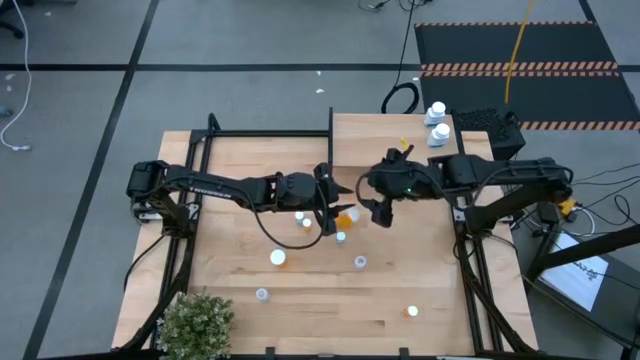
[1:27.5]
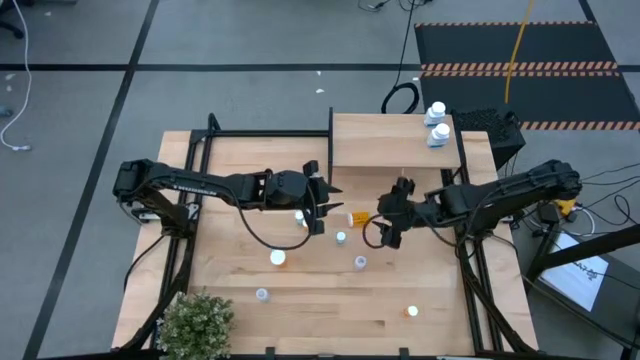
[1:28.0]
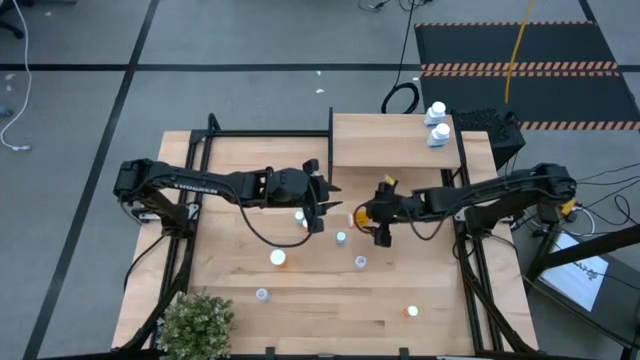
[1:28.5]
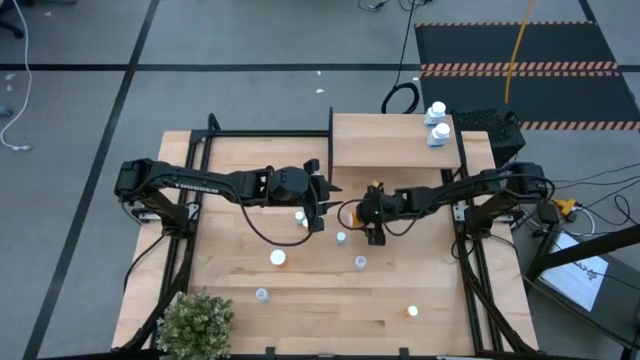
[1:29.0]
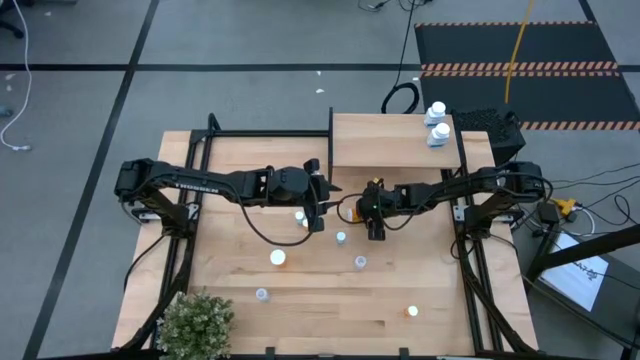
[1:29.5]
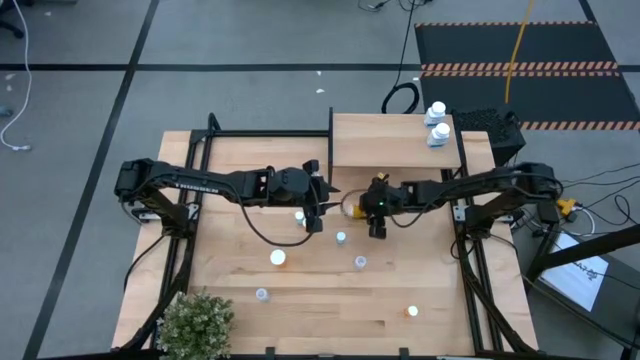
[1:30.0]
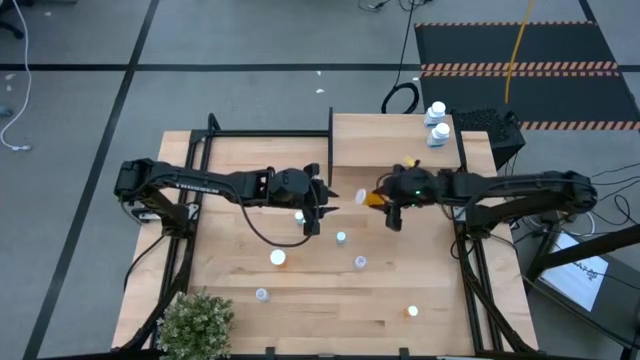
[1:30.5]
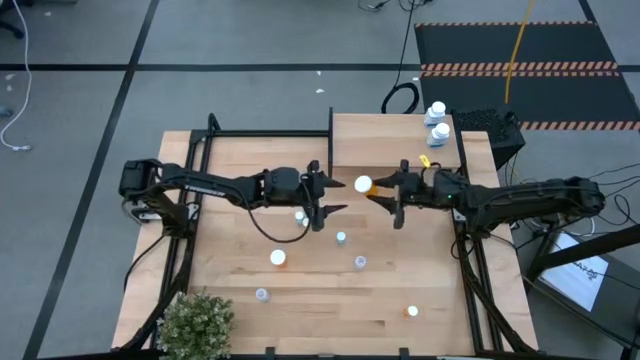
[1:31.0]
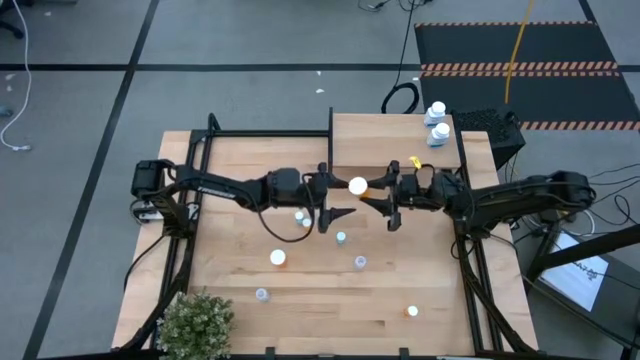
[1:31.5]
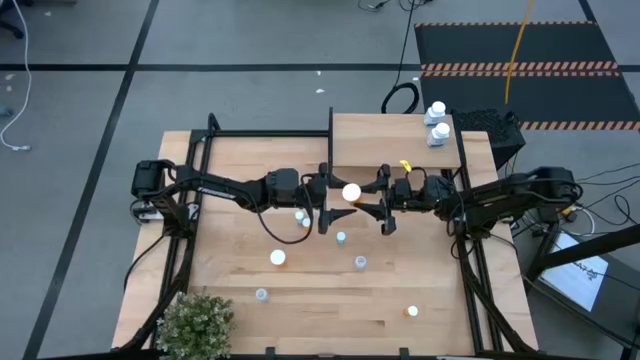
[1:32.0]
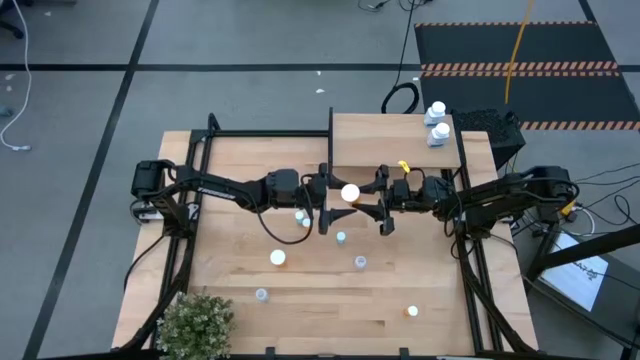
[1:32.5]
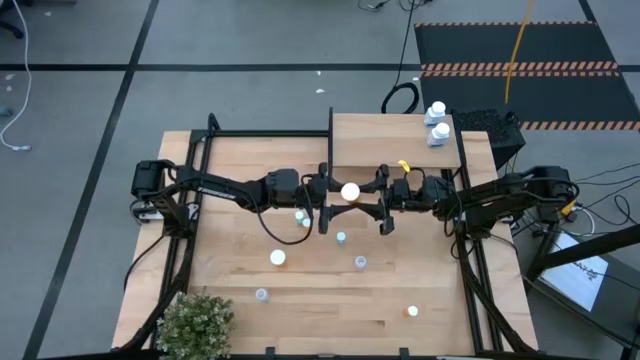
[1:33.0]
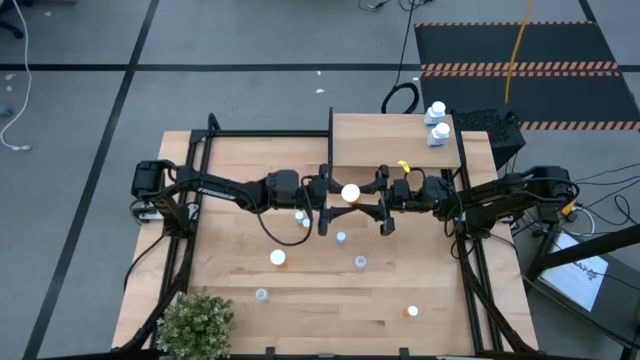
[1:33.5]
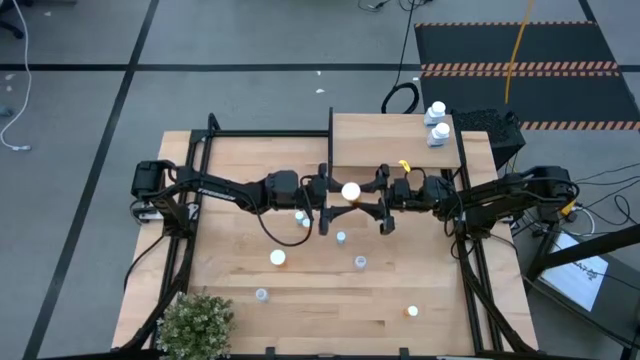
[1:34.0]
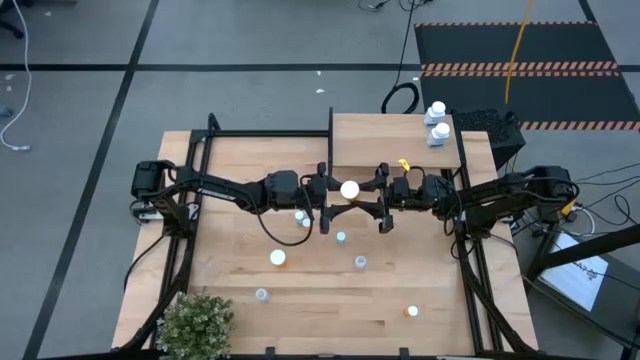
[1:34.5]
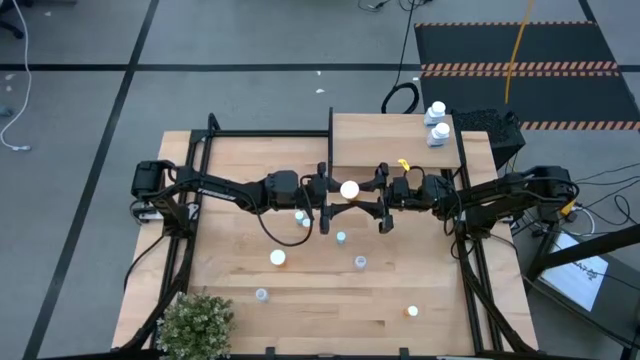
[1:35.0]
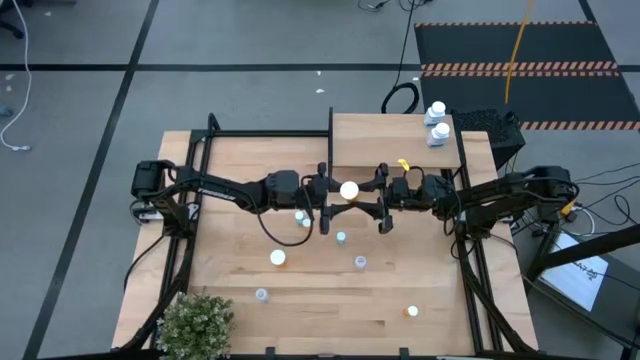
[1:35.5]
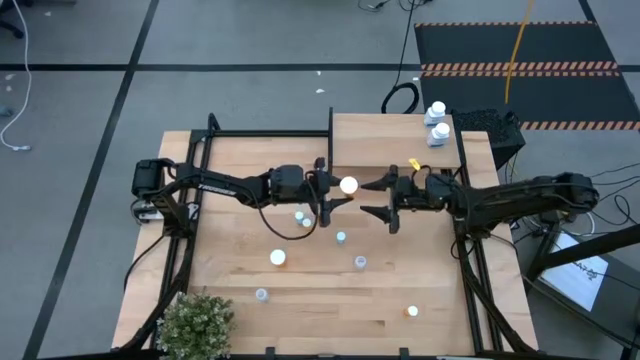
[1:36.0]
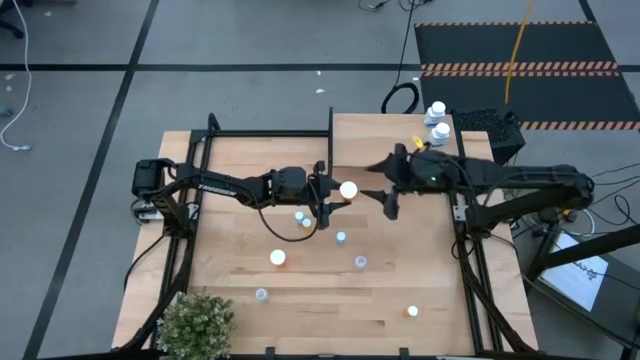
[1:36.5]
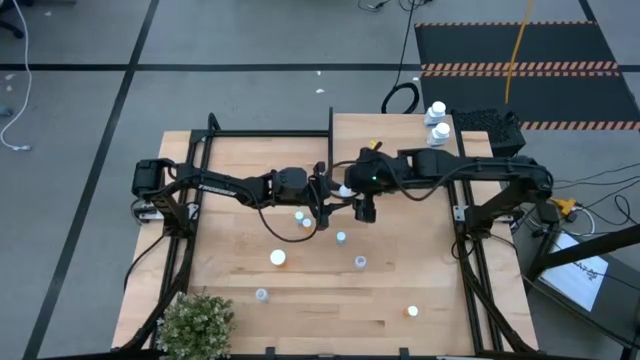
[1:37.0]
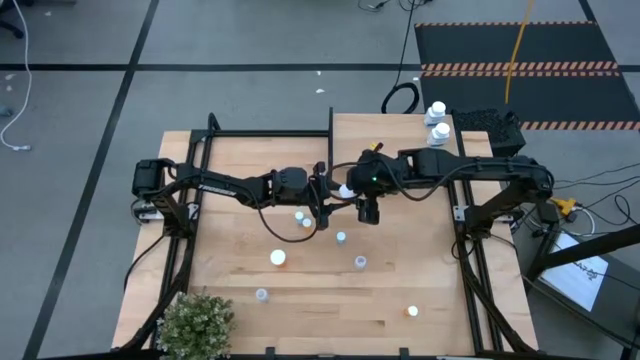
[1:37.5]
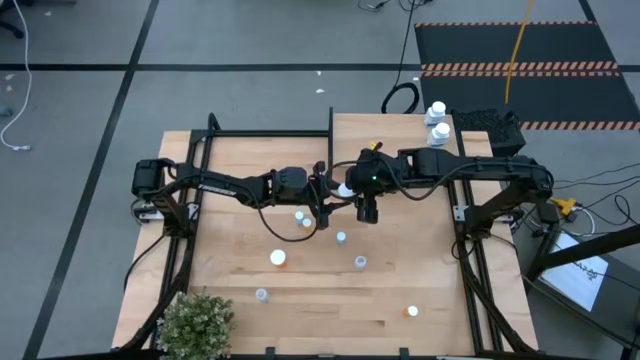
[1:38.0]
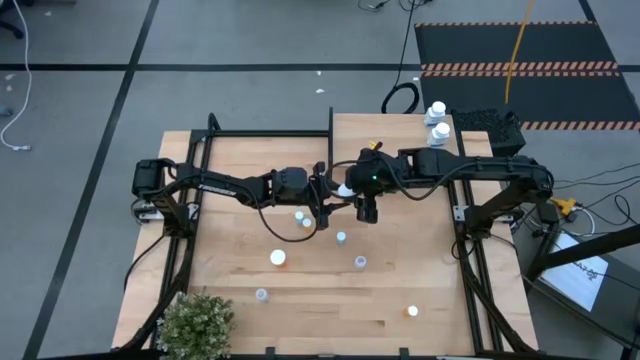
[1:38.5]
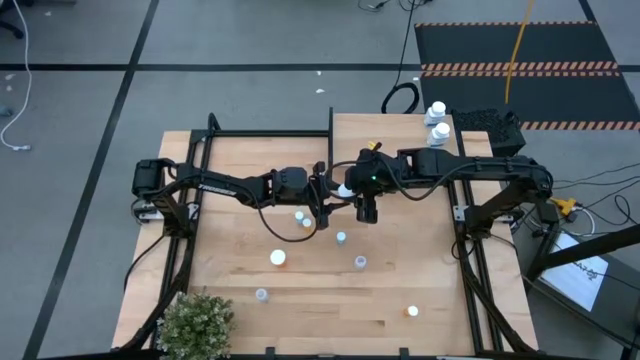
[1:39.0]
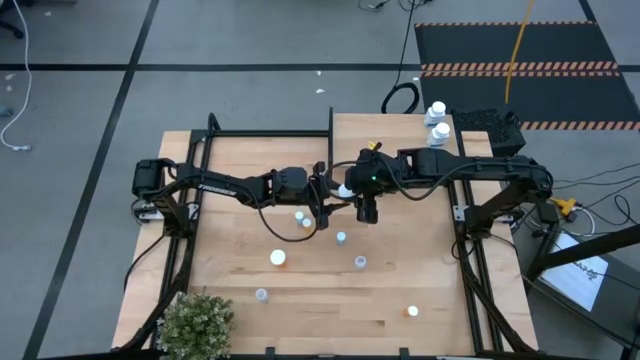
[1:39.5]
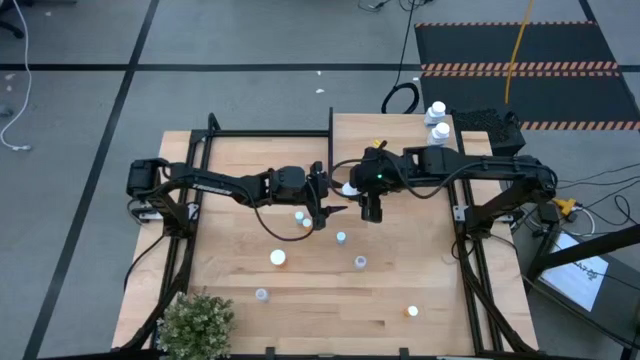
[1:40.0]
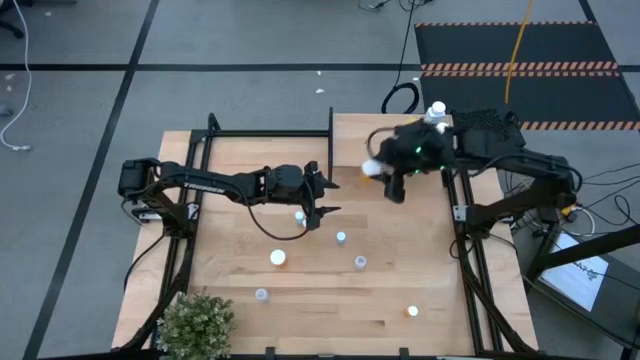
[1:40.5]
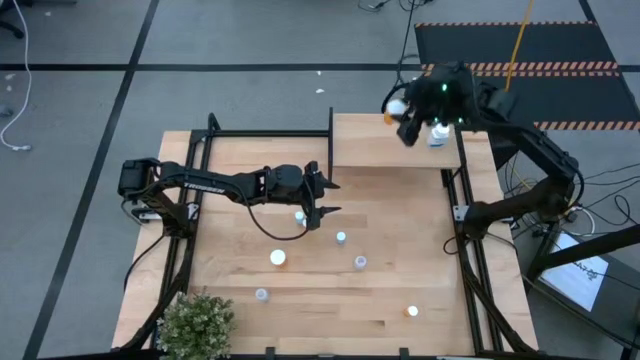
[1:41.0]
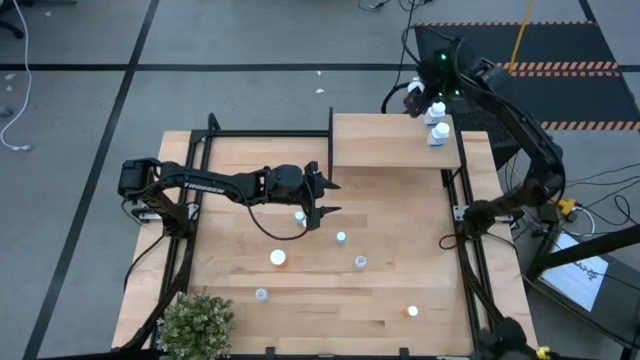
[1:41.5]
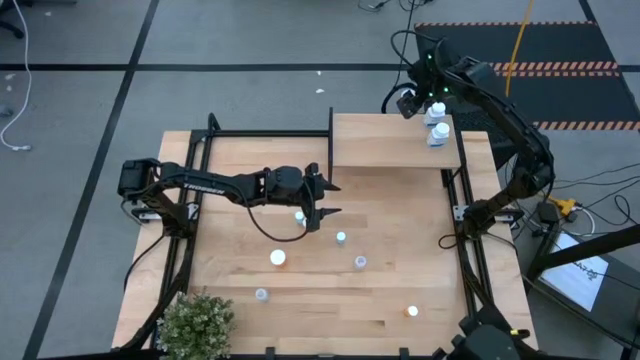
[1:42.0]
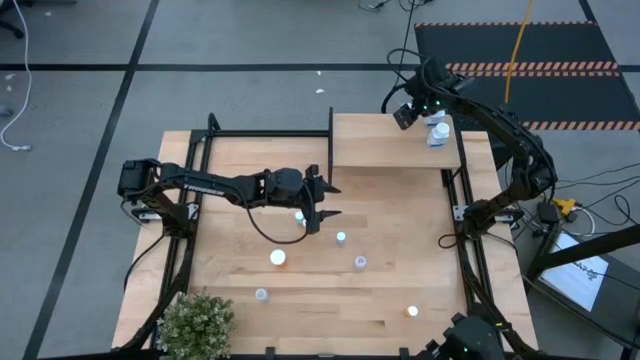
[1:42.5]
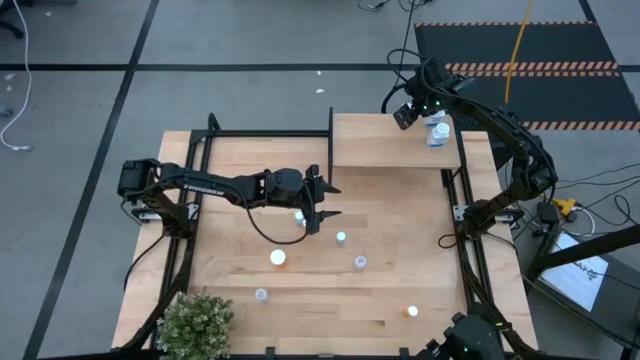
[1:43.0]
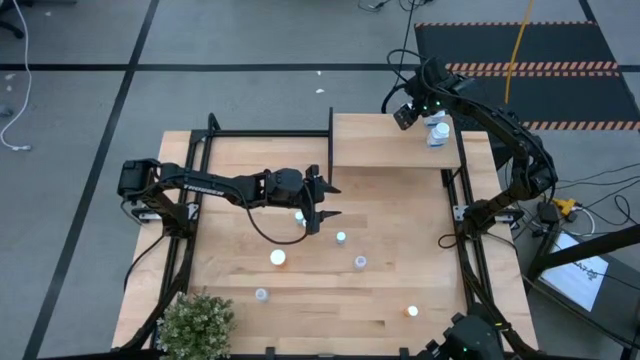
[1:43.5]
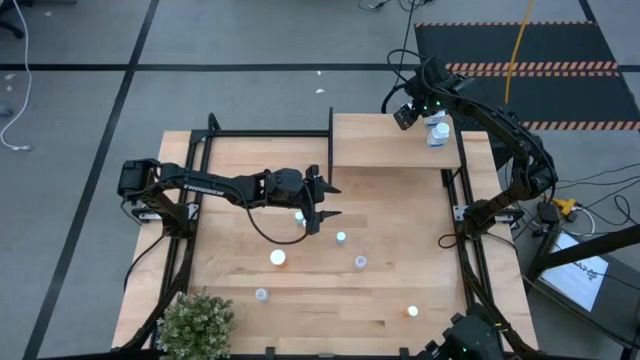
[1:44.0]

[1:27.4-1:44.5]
Task: Pick and place medicine bottles onto shelf by color
Put the bottom large orange pill bottle on the shelf
